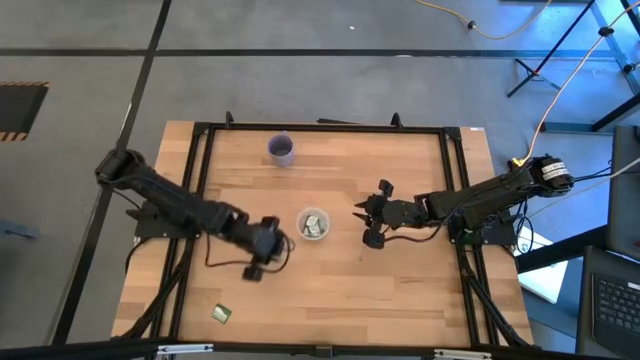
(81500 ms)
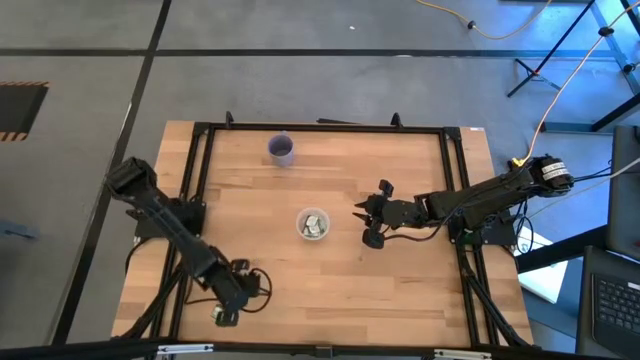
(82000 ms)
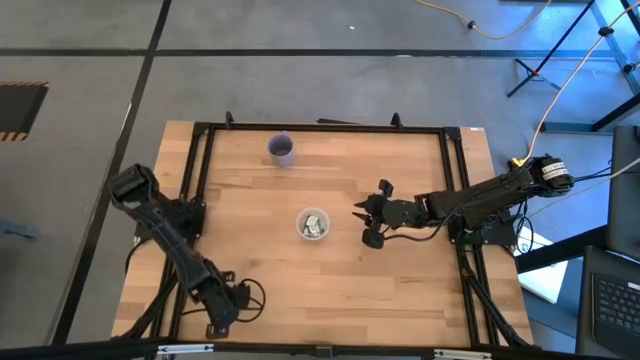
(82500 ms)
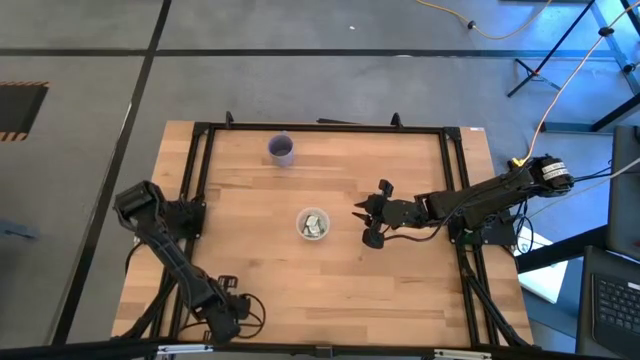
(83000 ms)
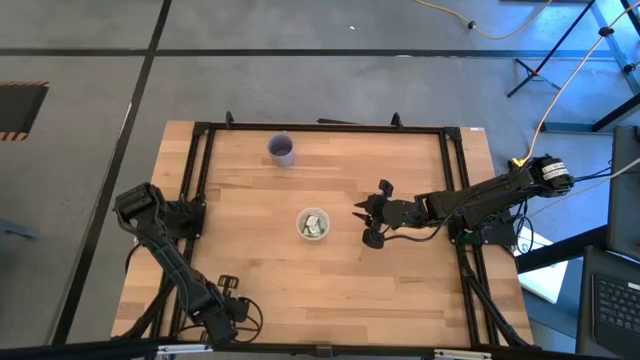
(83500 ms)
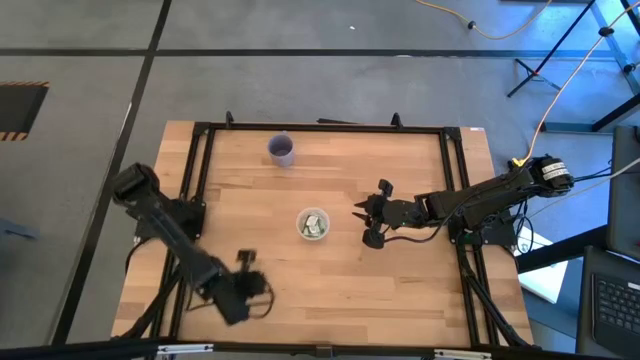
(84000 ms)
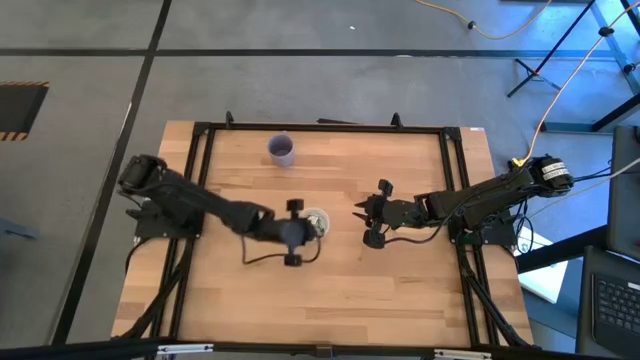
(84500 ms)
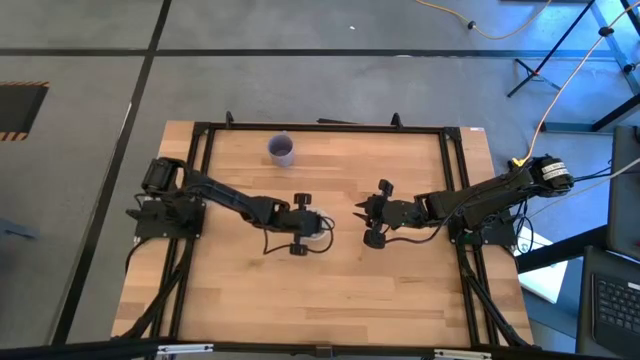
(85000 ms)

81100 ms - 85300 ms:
Task: Pick and place Stevia / Truvia into bins
Put the truvia packet into the transparent container

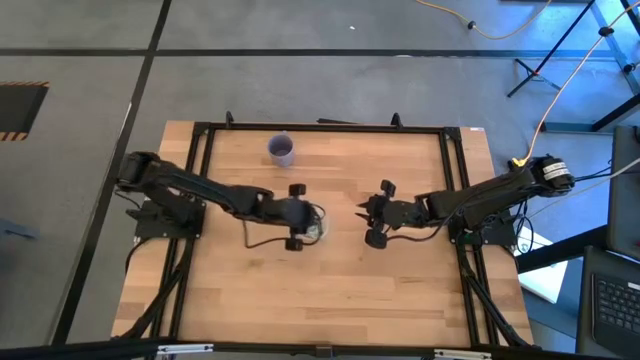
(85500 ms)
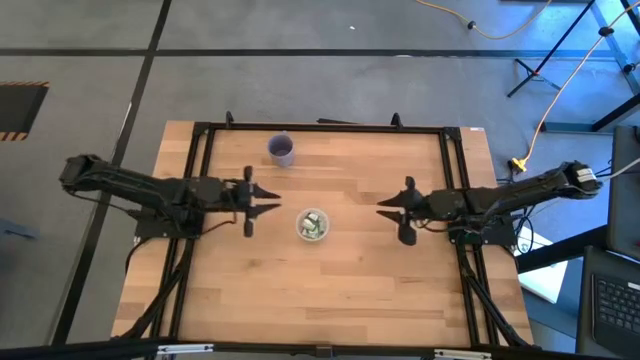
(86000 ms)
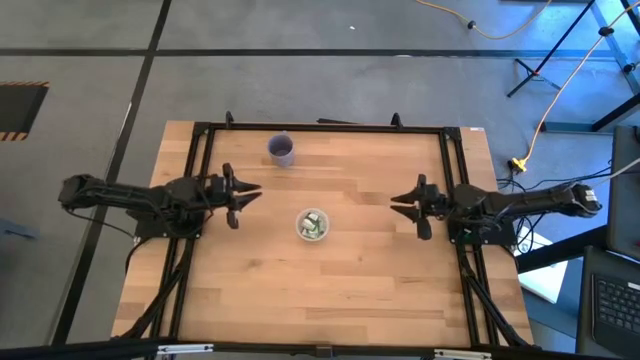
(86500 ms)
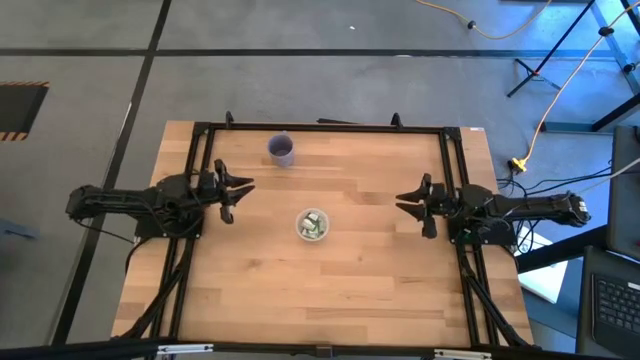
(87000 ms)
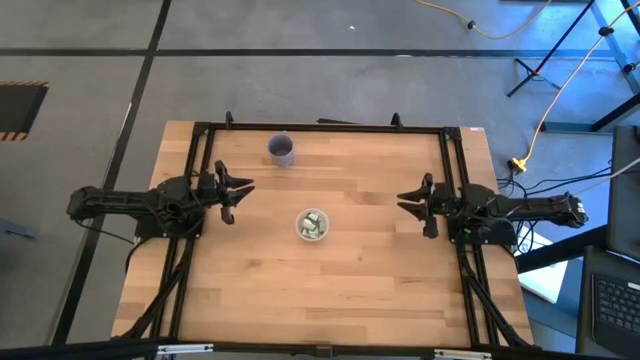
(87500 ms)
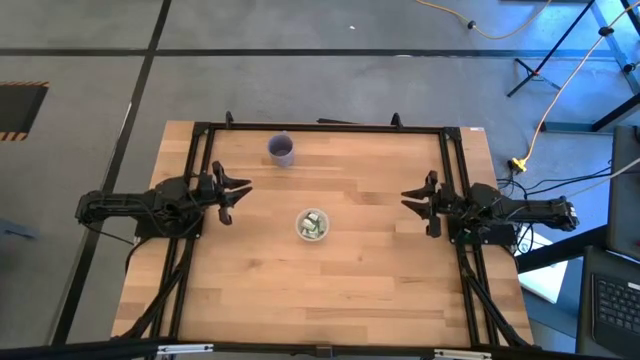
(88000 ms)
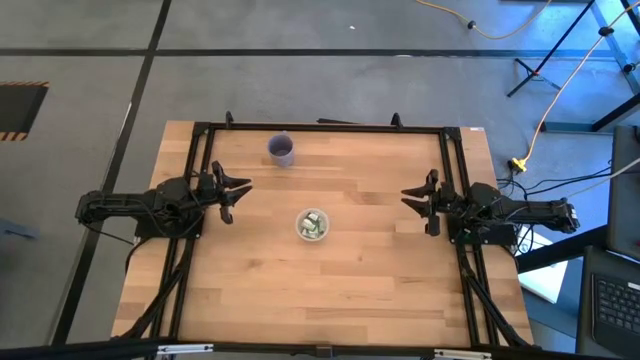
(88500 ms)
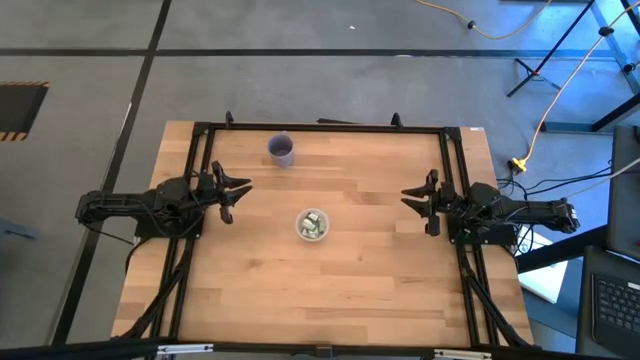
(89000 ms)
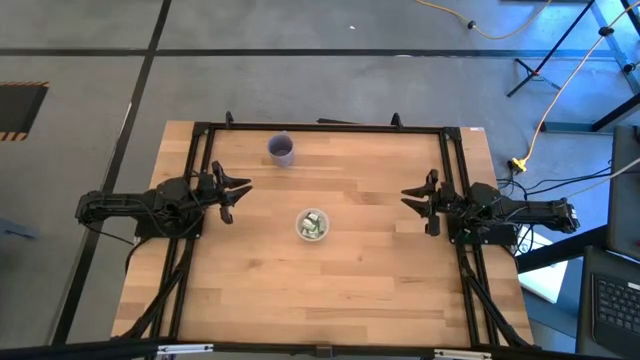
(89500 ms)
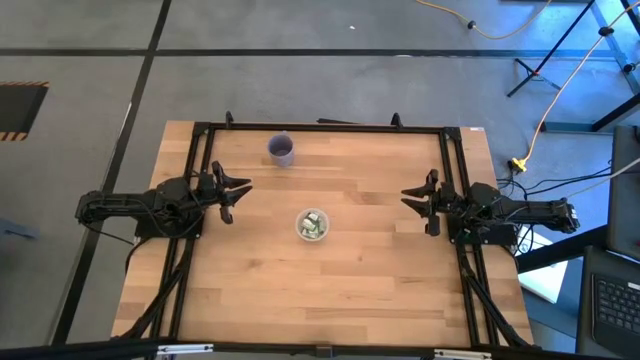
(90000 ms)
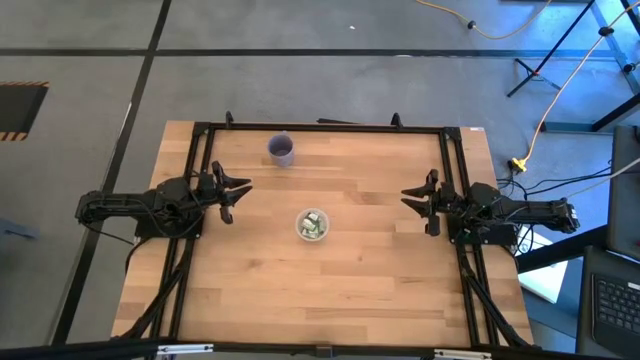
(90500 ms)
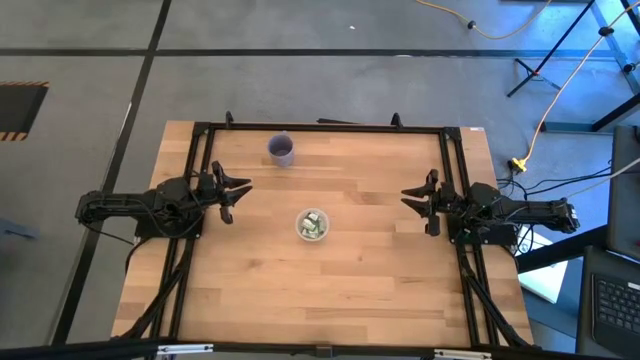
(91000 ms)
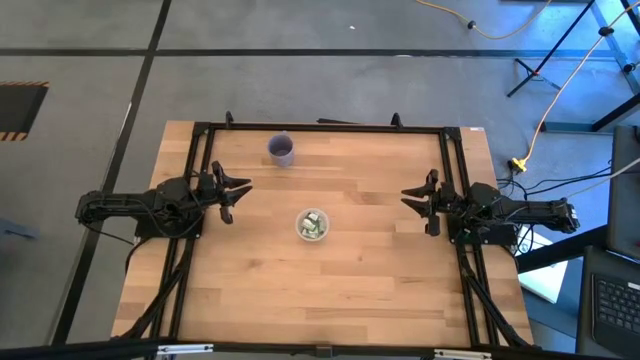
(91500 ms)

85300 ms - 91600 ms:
Return to Home Position

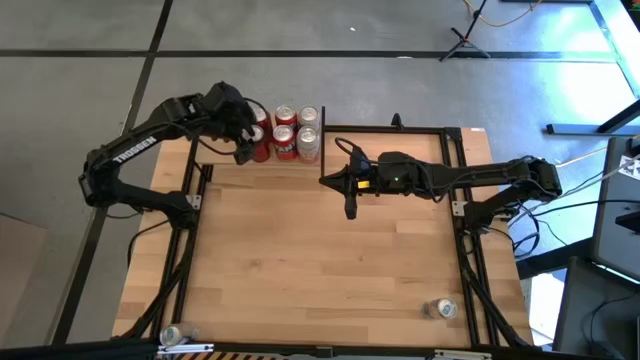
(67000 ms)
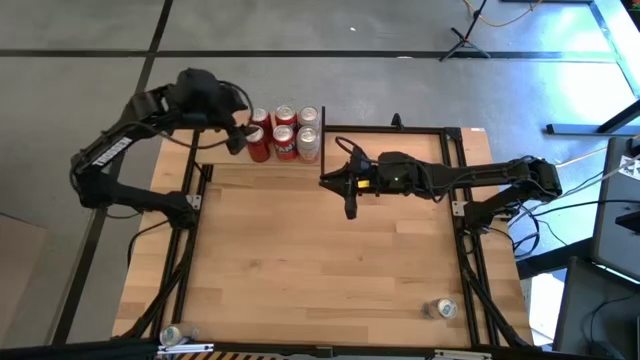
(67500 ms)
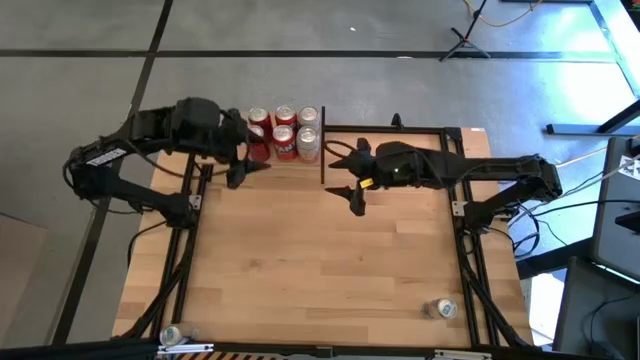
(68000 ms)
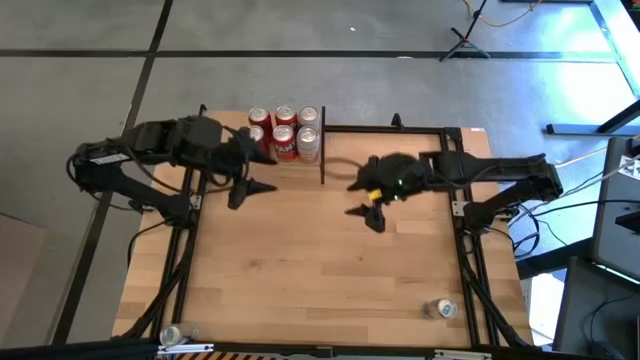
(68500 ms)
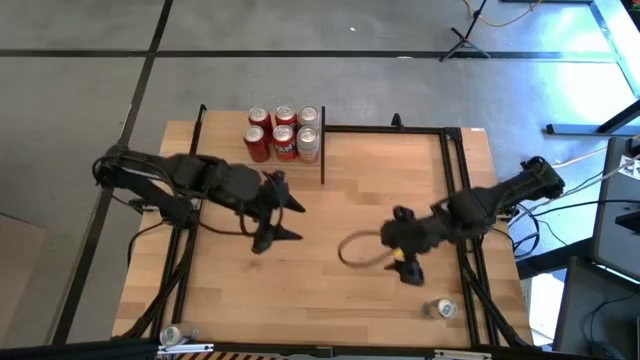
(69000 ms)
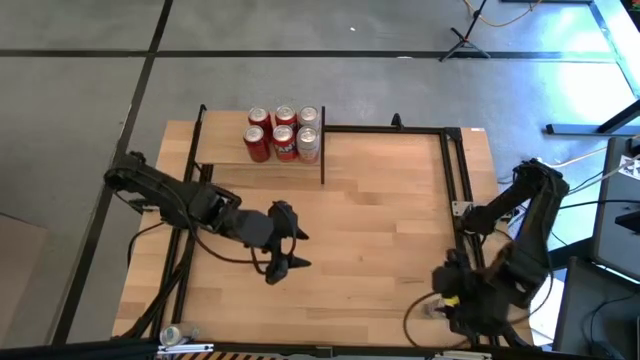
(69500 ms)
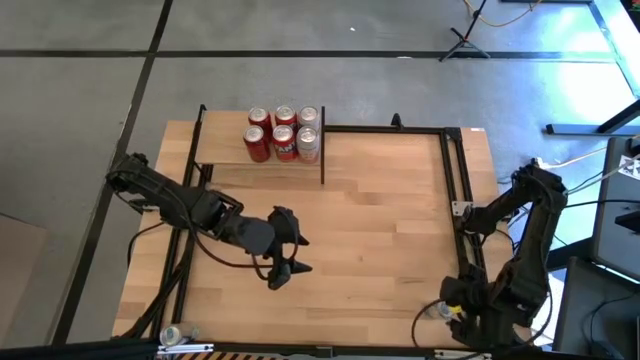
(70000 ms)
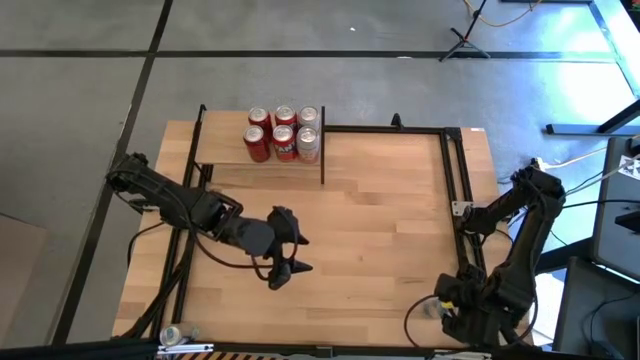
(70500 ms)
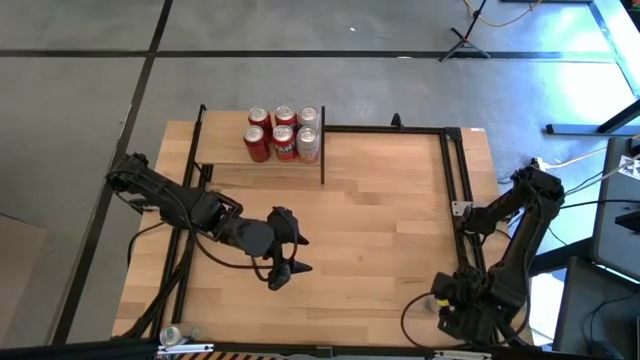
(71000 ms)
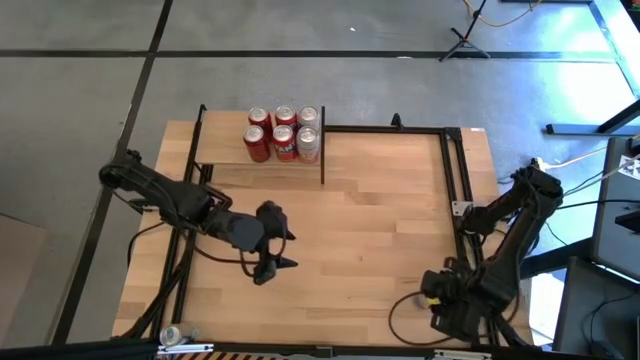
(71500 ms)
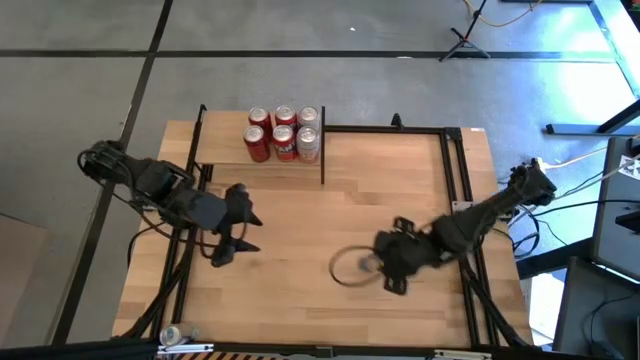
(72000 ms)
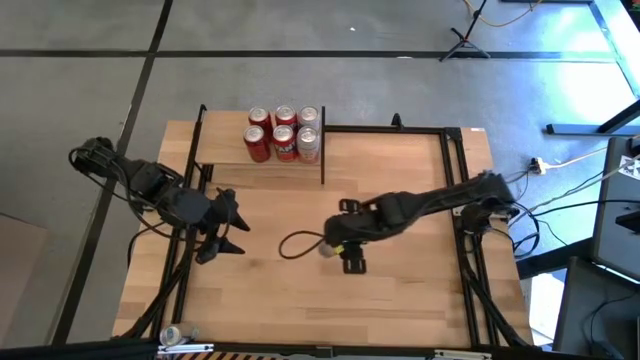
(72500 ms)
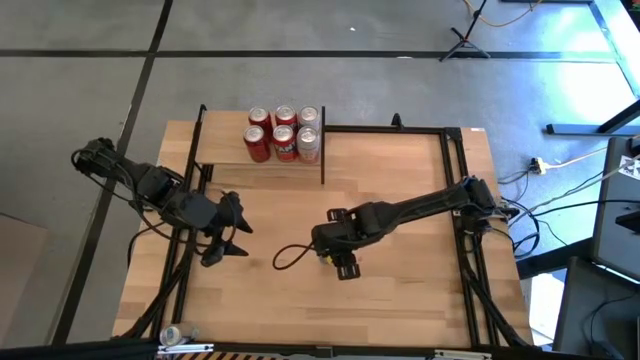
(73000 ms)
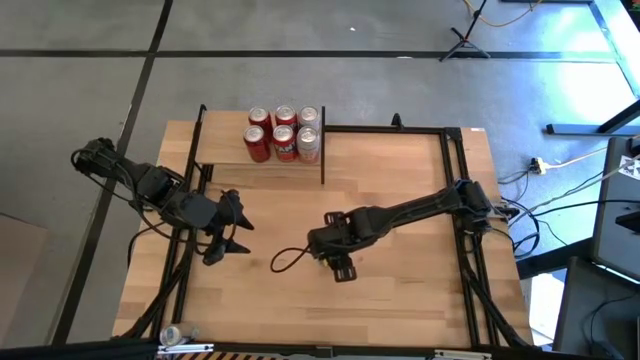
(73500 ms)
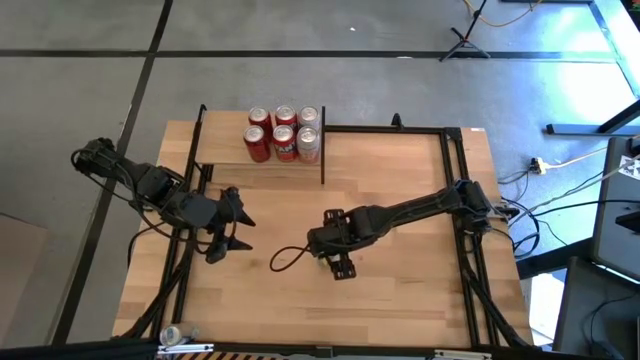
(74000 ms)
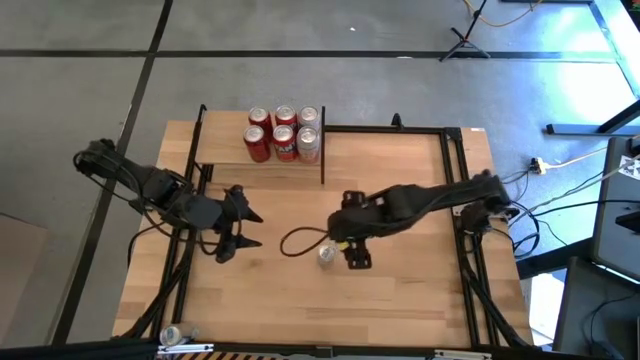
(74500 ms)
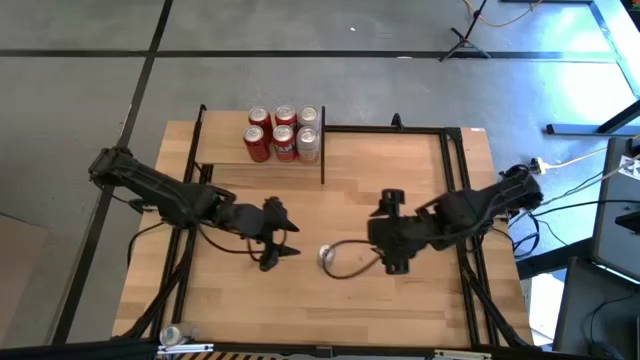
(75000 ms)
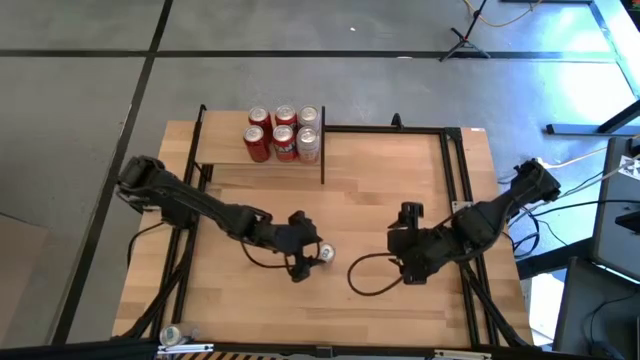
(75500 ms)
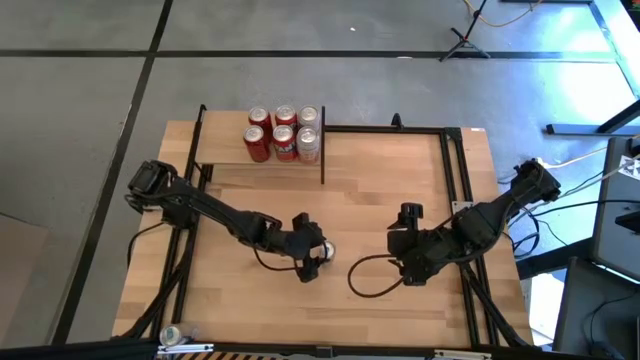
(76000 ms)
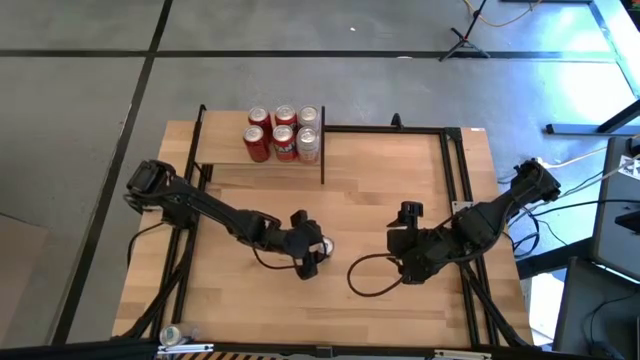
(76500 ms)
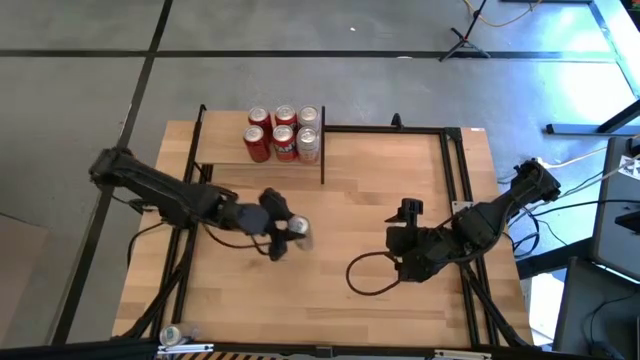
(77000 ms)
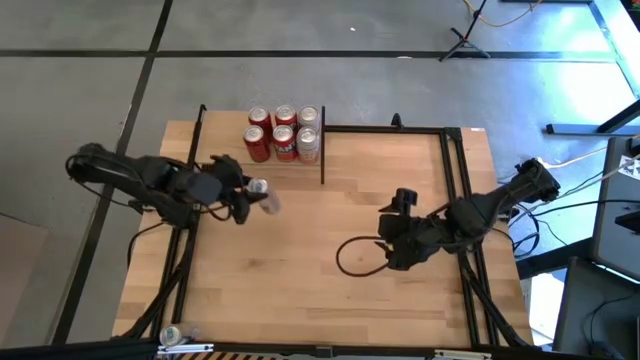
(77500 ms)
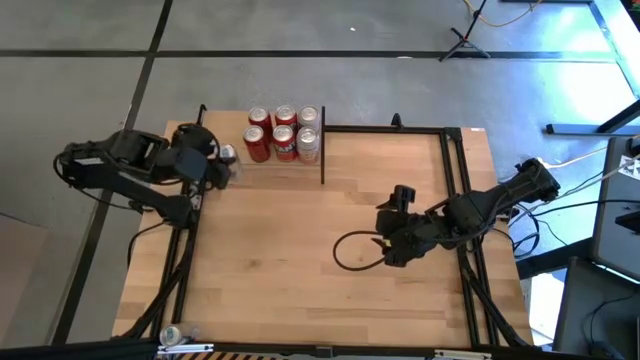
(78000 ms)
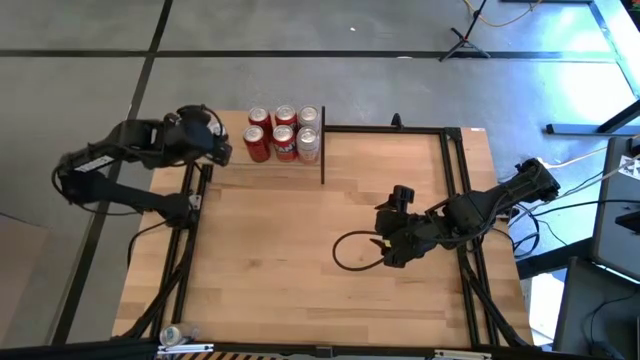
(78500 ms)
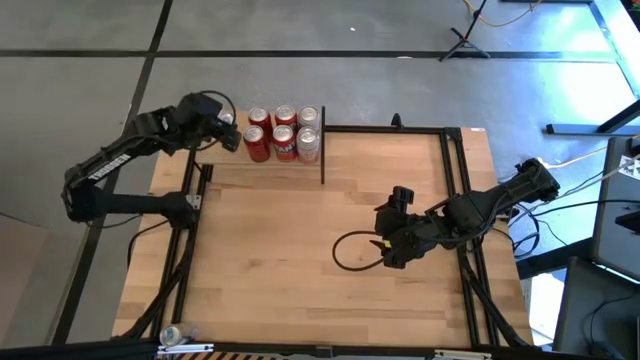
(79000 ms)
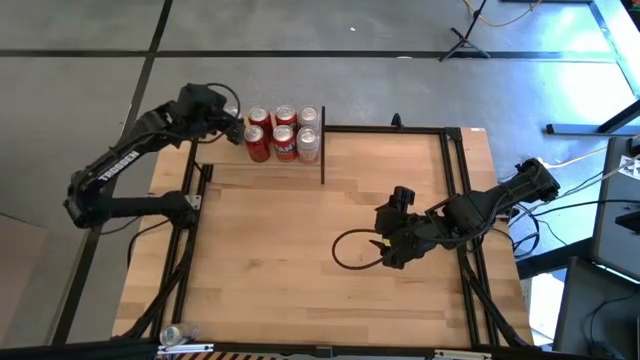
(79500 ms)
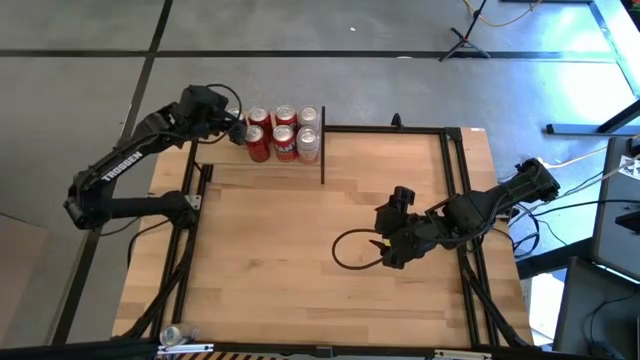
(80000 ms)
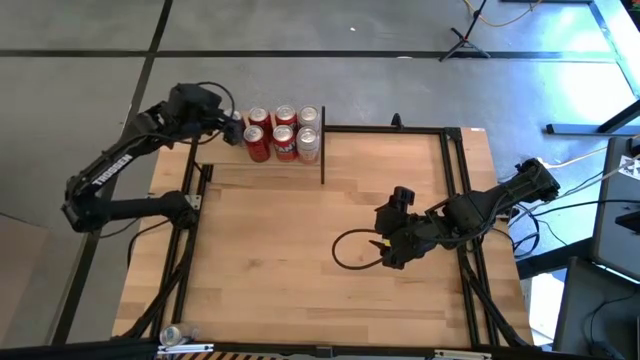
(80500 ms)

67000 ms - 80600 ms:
Task: Place canned beverage on shelf
Put the right blue soda can on the shelf
